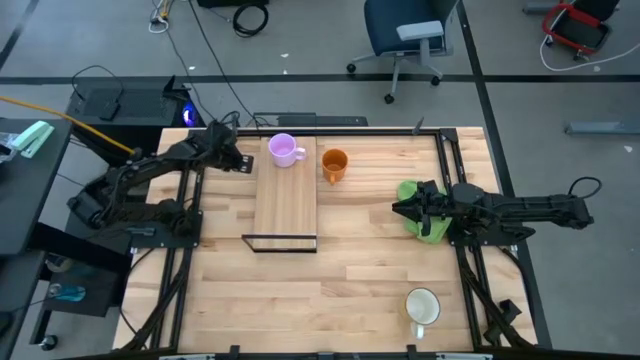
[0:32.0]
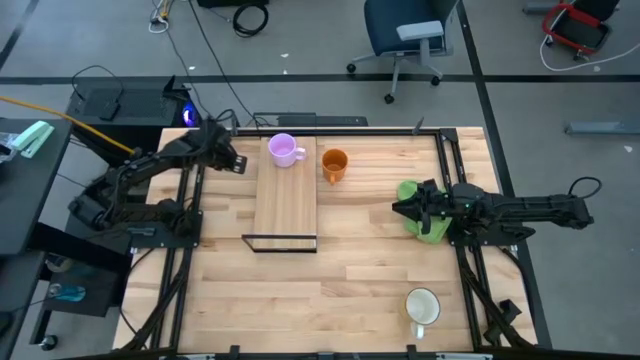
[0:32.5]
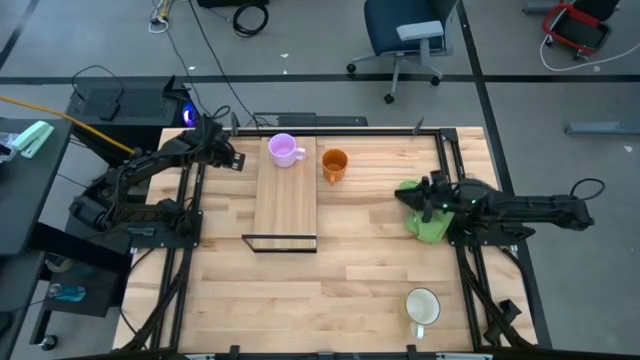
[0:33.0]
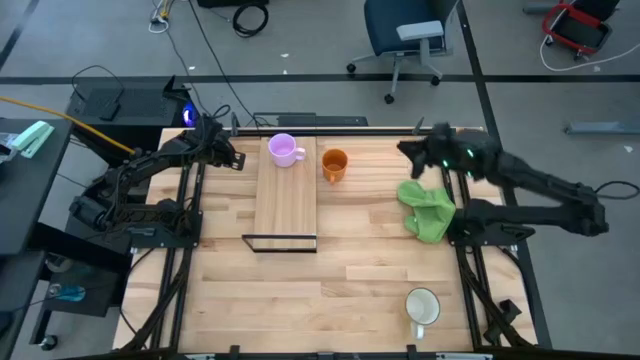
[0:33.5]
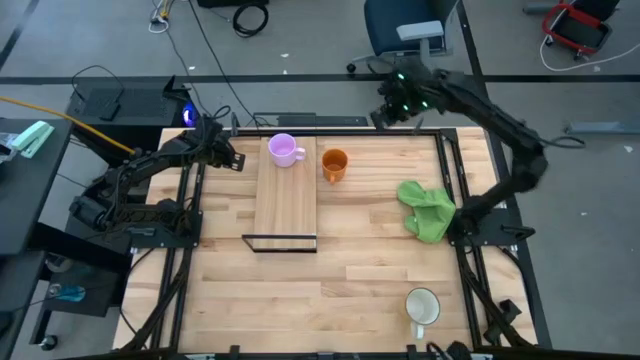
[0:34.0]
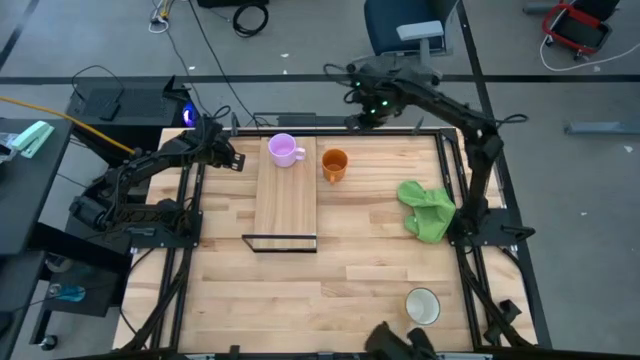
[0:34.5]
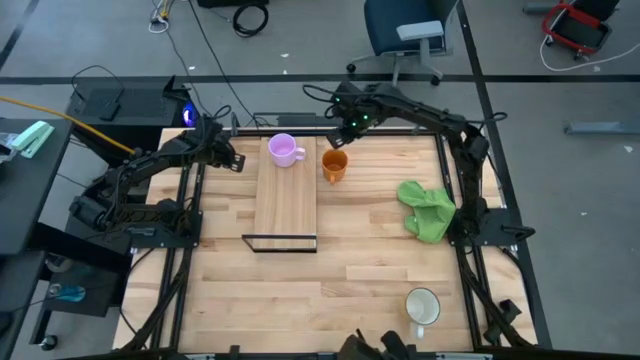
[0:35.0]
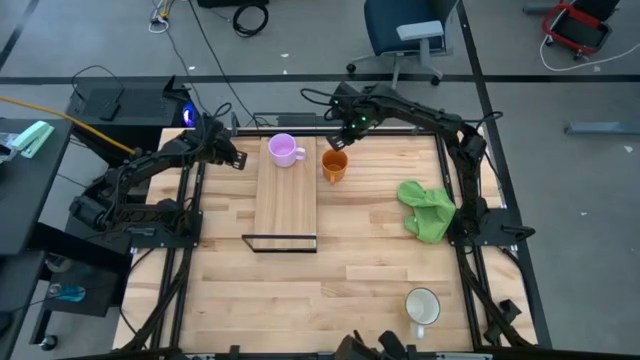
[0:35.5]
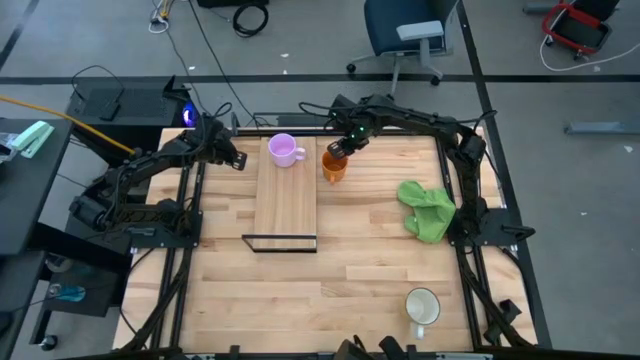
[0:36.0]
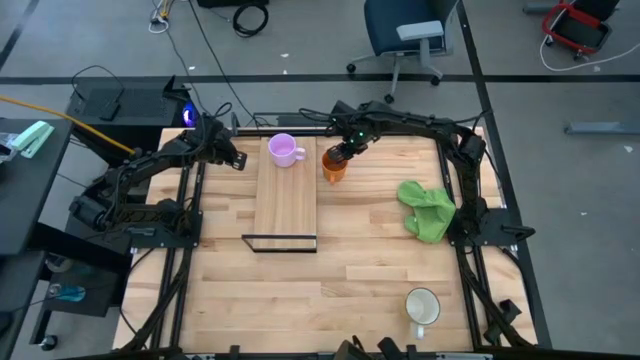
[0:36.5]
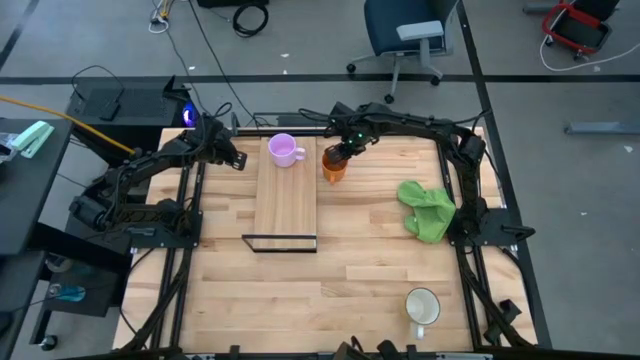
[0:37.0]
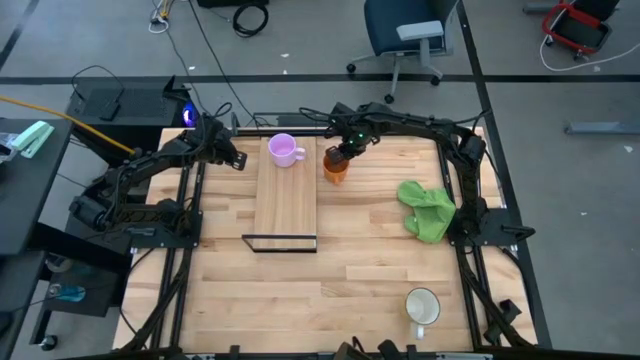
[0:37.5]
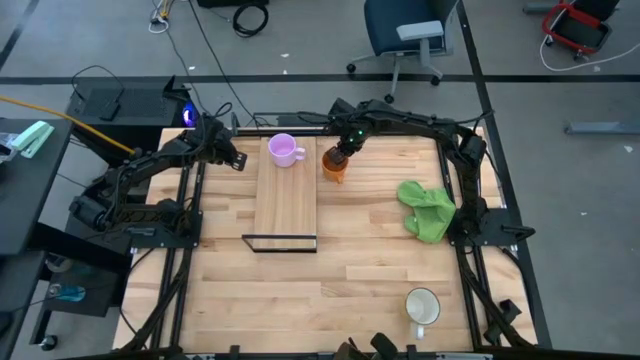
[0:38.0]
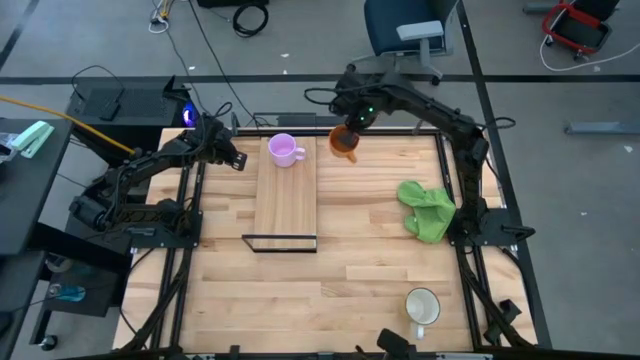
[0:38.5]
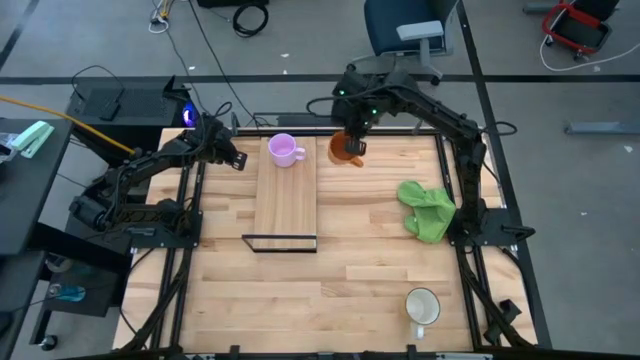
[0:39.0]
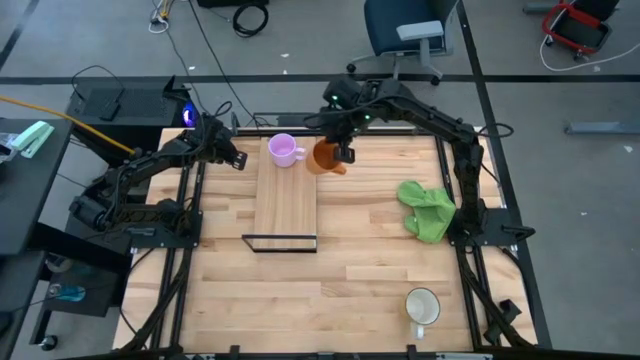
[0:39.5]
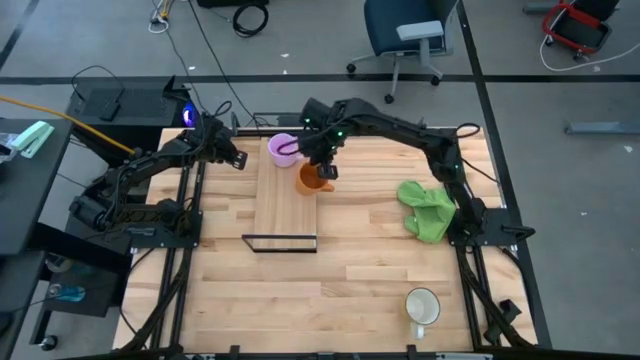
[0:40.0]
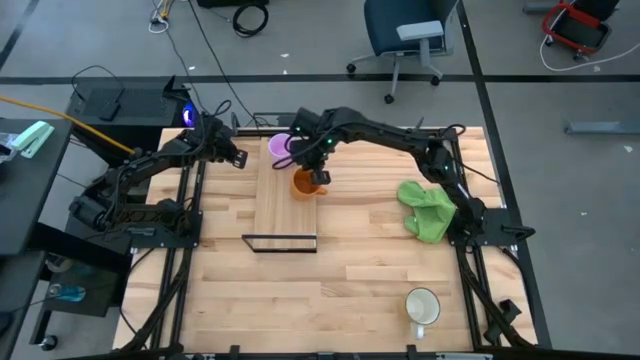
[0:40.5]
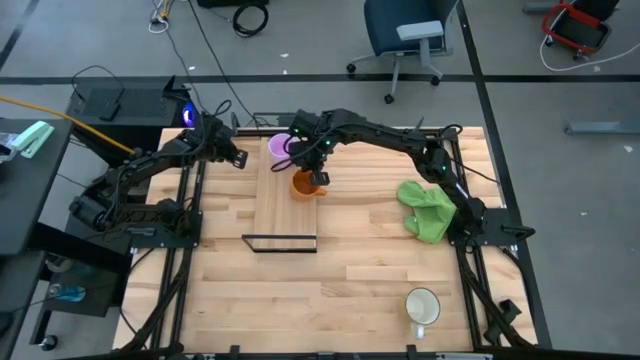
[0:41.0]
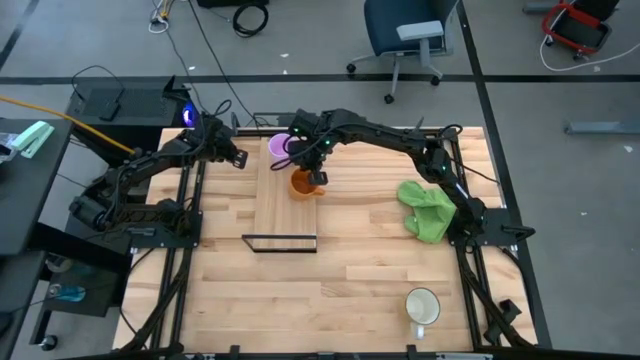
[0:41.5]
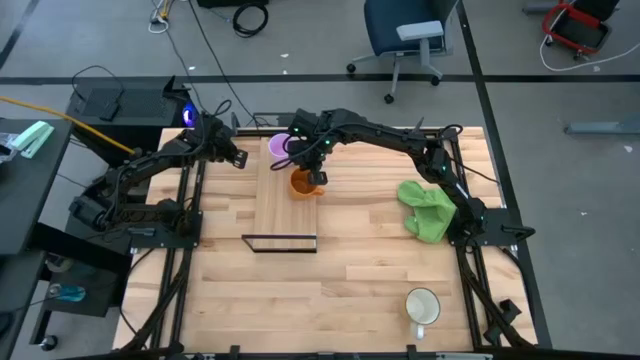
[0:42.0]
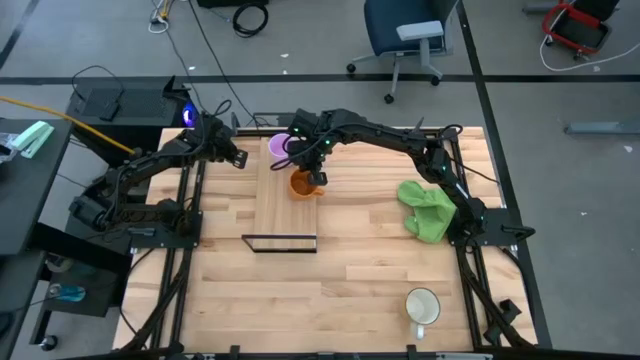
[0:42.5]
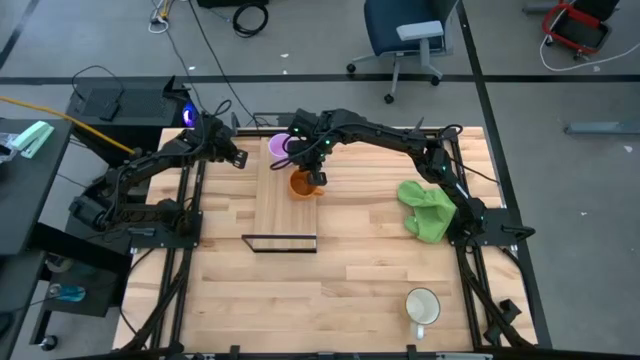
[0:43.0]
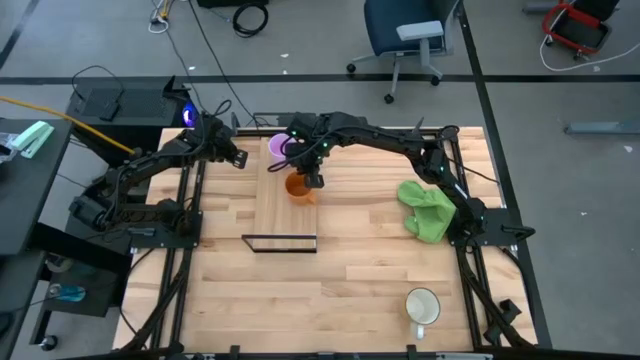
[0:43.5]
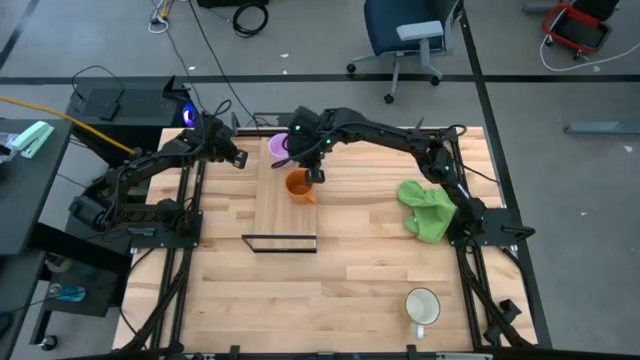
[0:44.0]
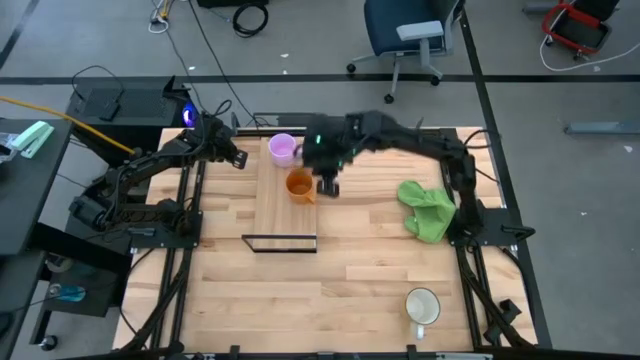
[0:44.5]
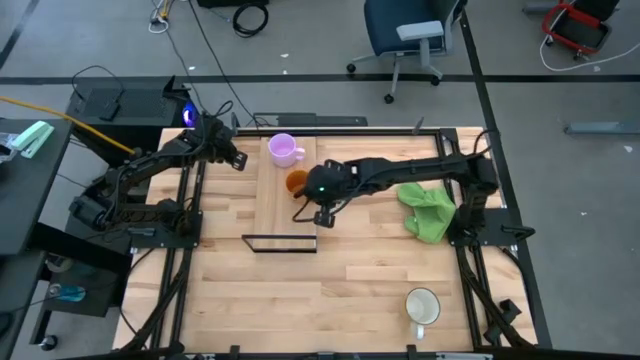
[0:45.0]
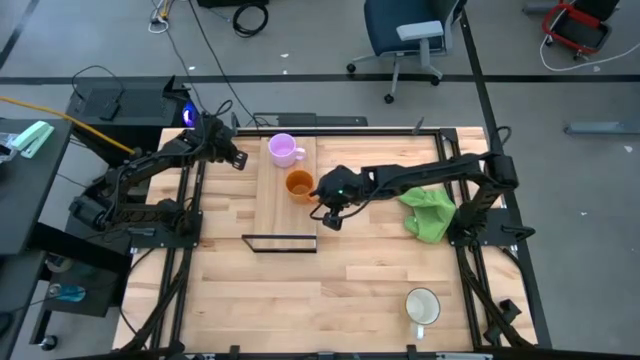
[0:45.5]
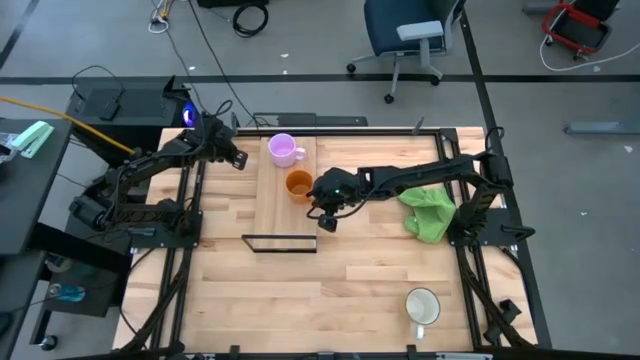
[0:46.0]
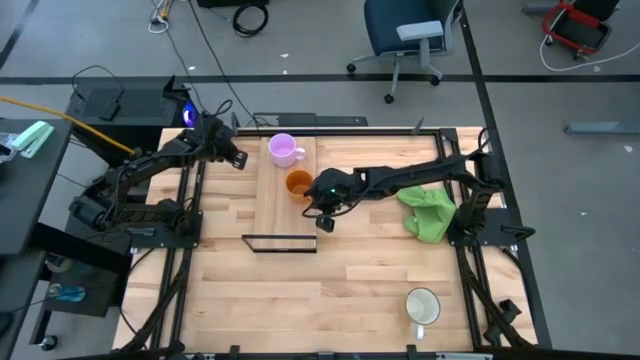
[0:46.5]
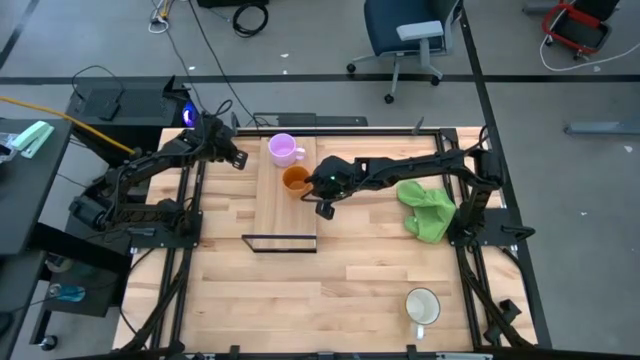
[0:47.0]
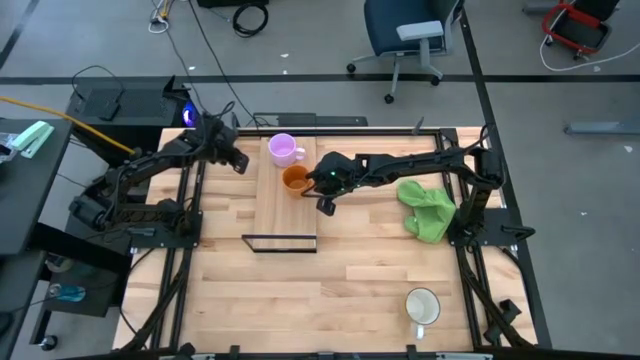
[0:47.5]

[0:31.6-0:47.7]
Task: Stack small to large cups/mugs on shelf
Put the orange mug on the shelf

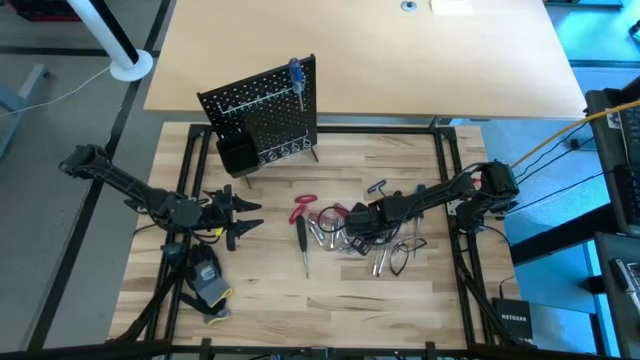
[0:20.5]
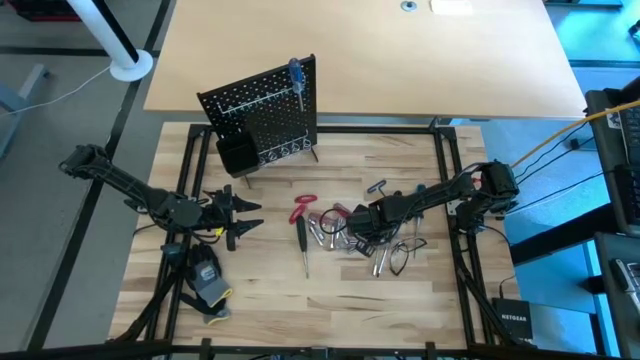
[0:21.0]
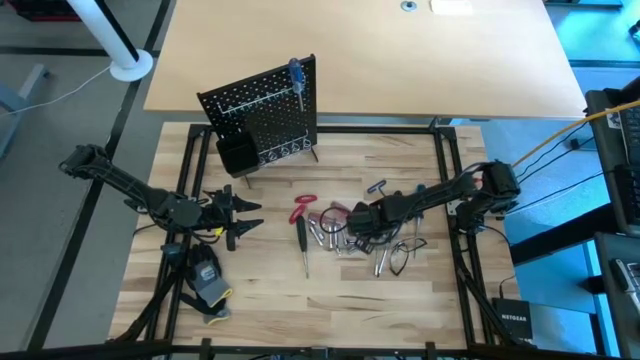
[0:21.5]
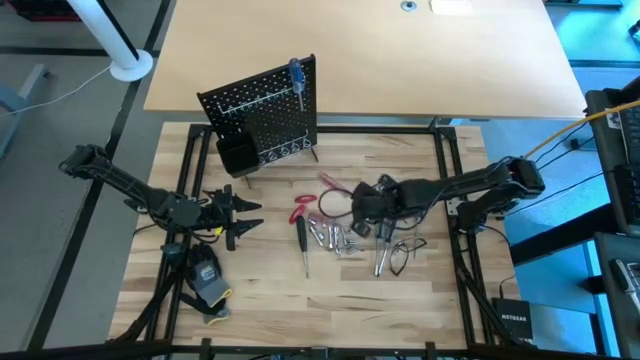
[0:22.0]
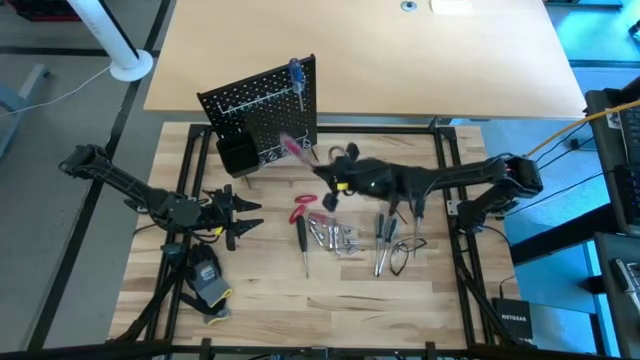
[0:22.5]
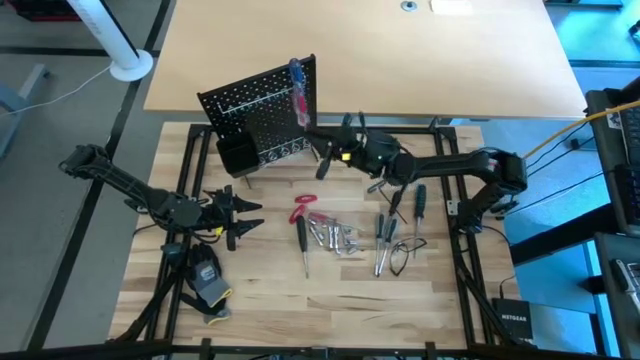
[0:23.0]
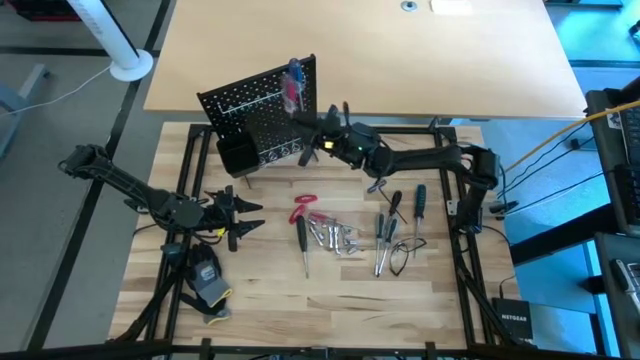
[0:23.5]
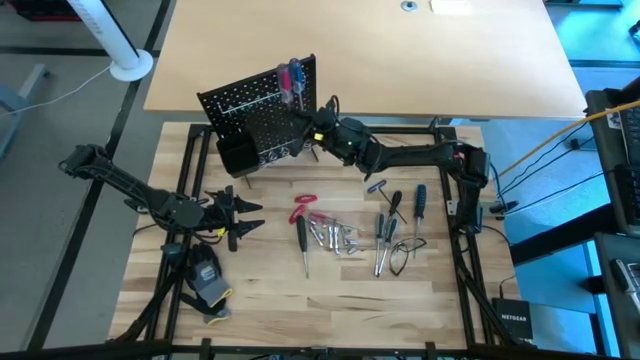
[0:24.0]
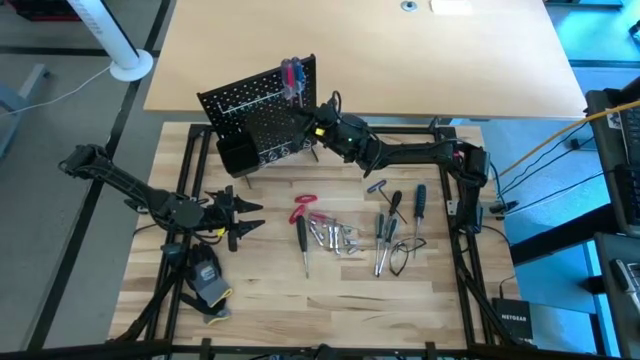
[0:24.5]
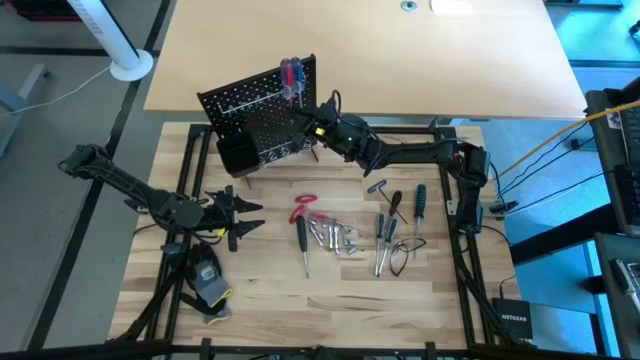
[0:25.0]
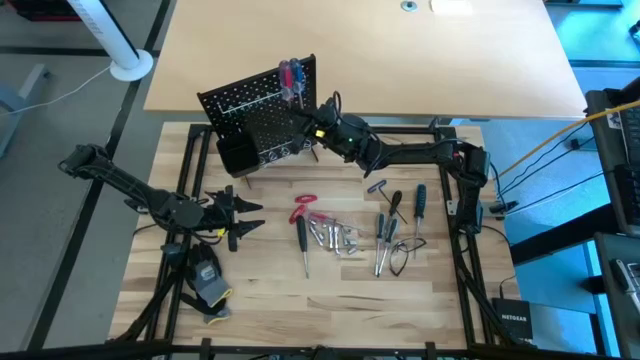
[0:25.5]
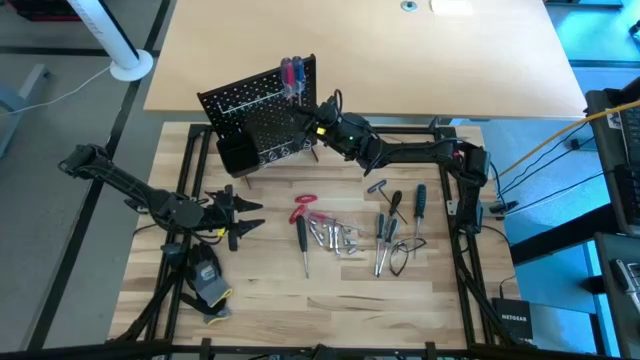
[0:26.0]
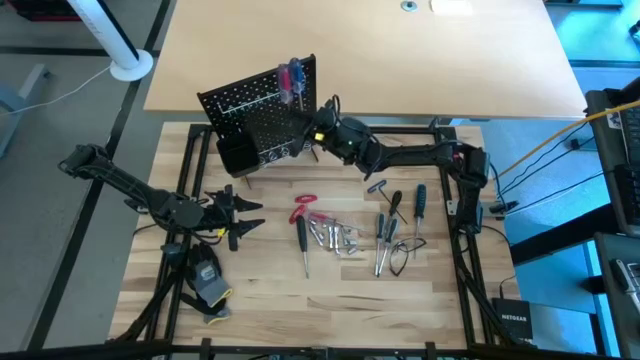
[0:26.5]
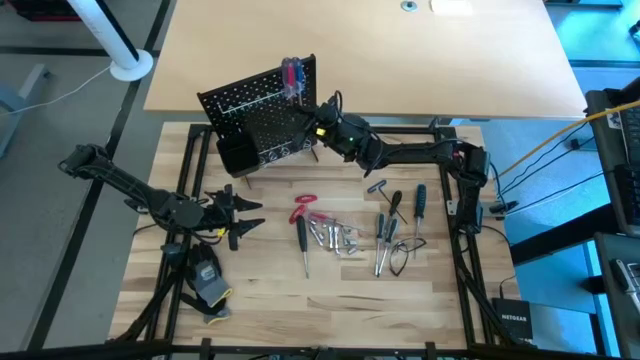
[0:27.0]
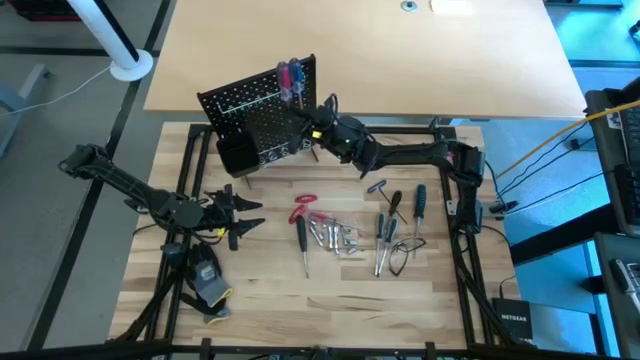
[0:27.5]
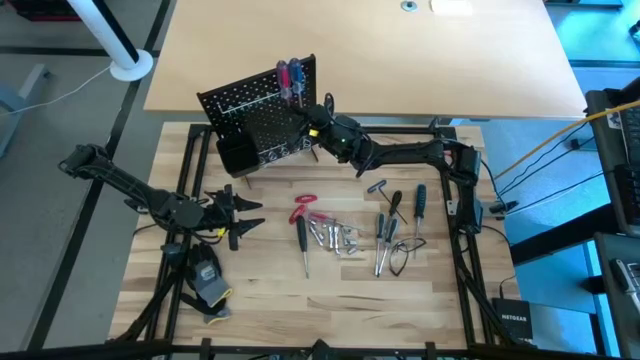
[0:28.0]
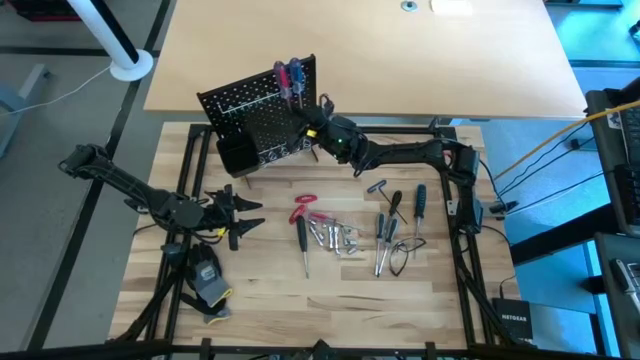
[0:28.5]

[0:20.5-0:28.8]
Task: Hang tools onto peg board
Hang the red screwdriver onto the peg board
